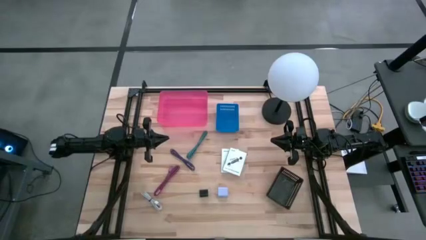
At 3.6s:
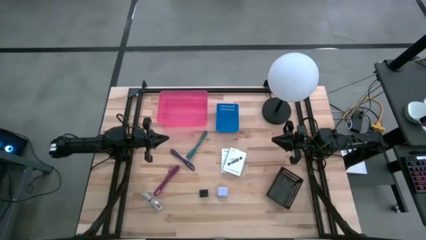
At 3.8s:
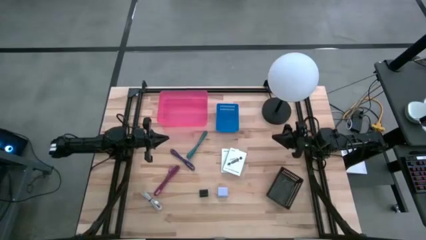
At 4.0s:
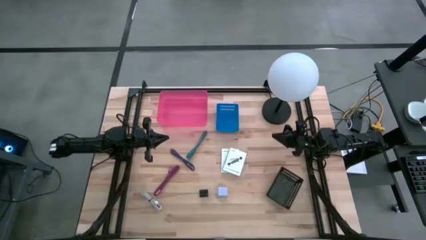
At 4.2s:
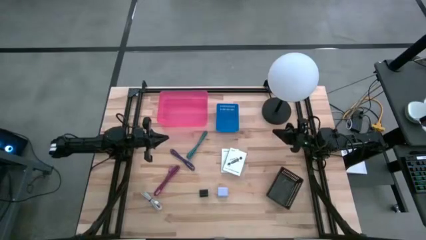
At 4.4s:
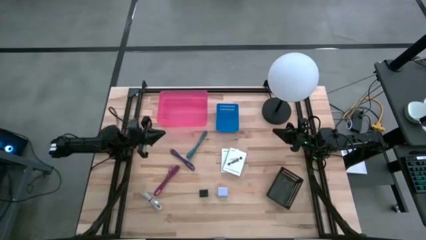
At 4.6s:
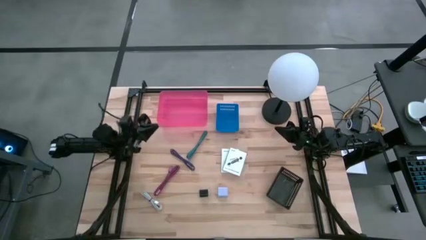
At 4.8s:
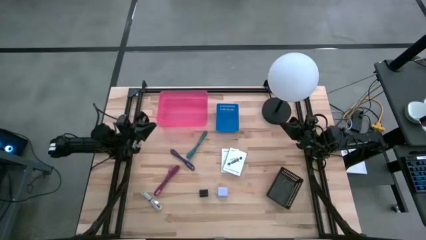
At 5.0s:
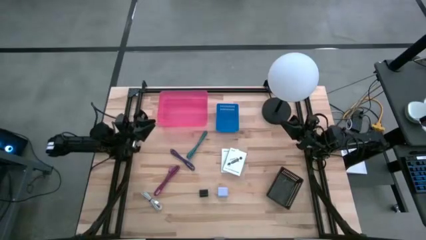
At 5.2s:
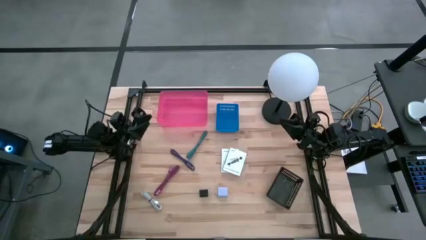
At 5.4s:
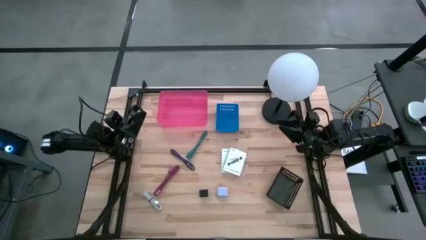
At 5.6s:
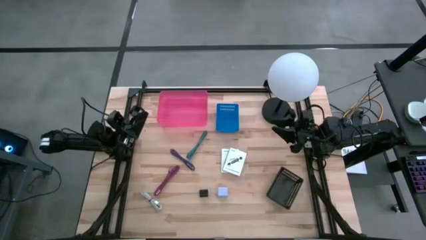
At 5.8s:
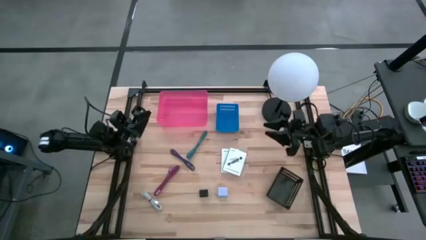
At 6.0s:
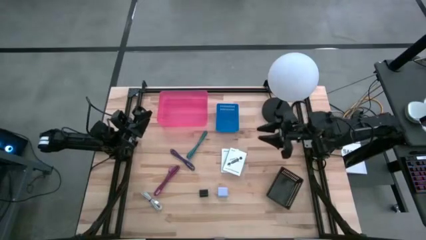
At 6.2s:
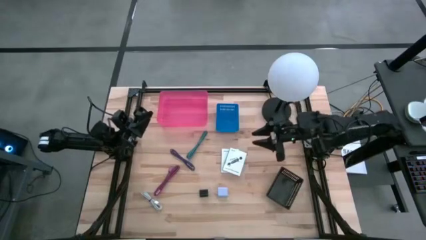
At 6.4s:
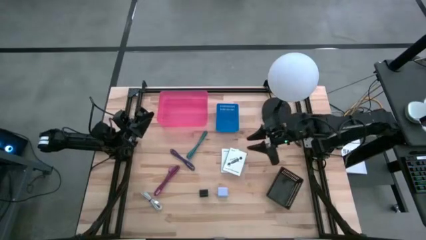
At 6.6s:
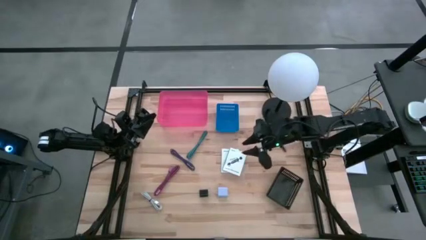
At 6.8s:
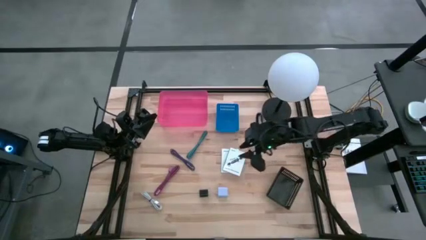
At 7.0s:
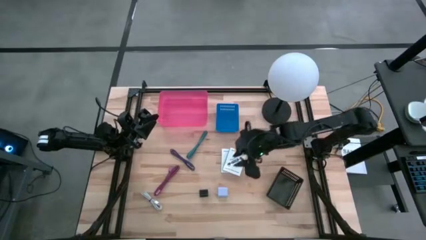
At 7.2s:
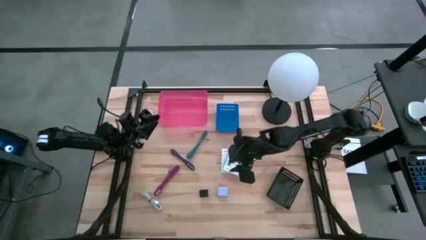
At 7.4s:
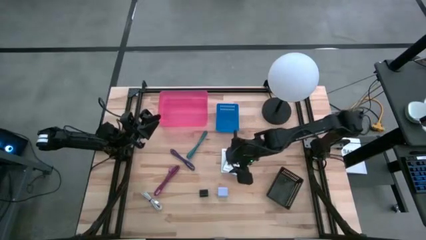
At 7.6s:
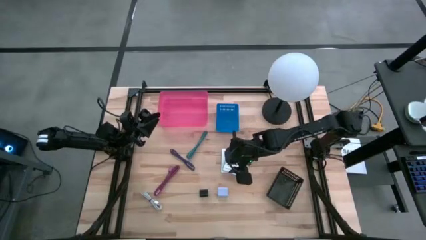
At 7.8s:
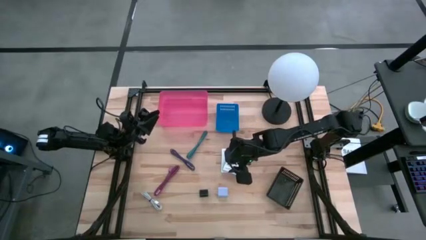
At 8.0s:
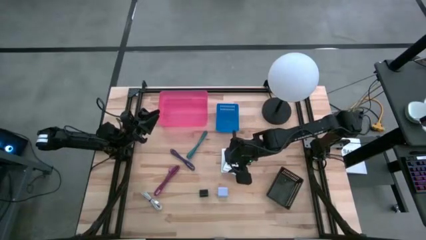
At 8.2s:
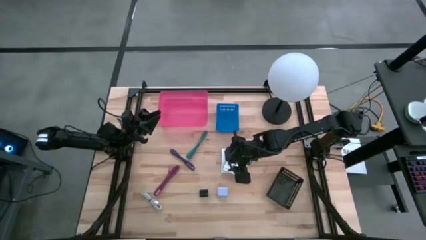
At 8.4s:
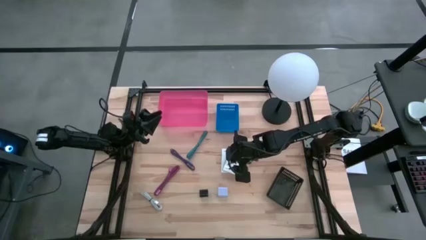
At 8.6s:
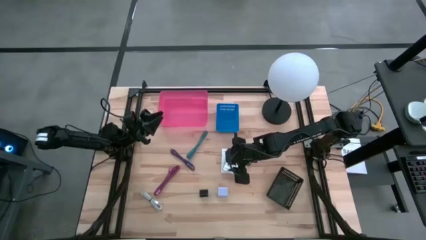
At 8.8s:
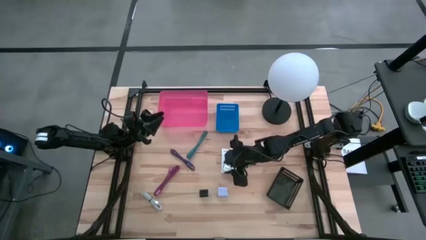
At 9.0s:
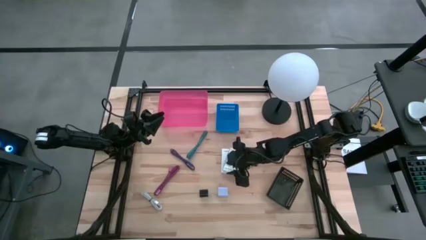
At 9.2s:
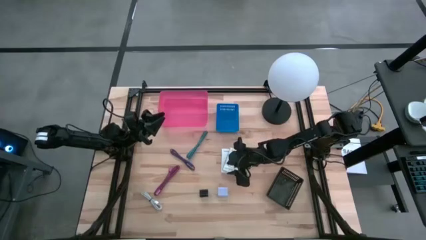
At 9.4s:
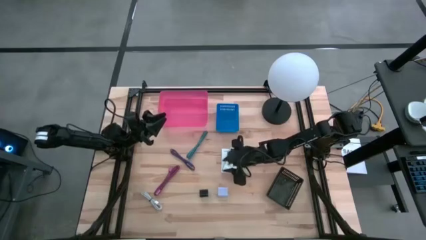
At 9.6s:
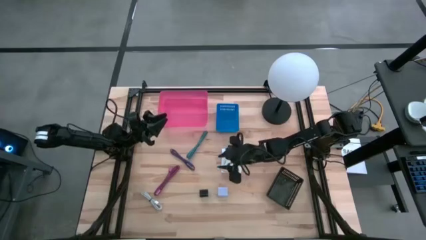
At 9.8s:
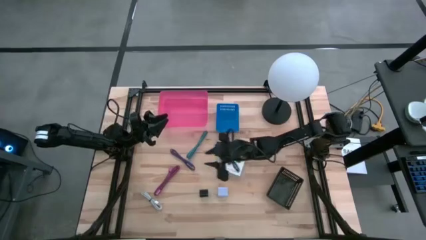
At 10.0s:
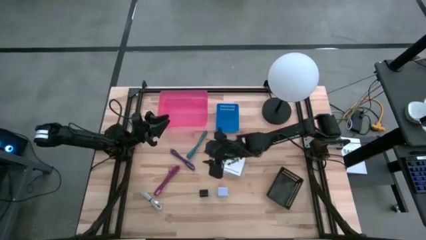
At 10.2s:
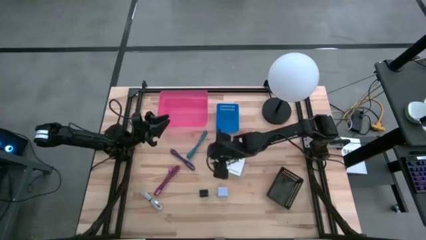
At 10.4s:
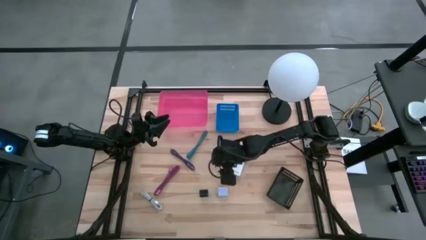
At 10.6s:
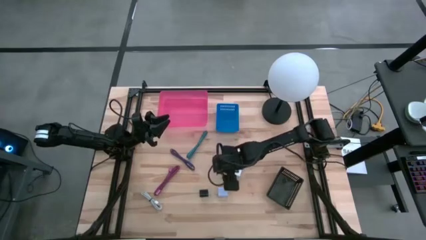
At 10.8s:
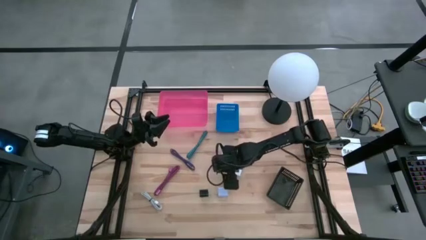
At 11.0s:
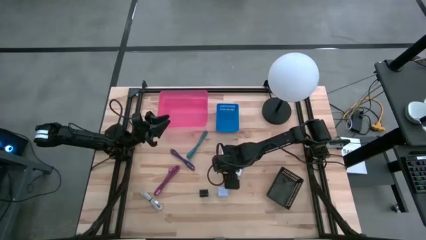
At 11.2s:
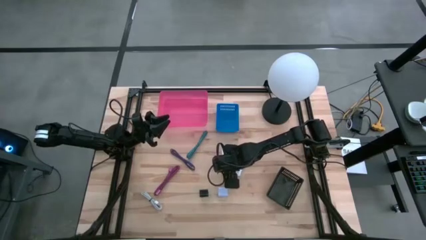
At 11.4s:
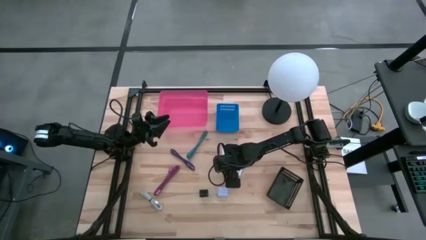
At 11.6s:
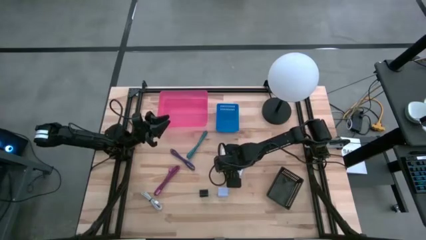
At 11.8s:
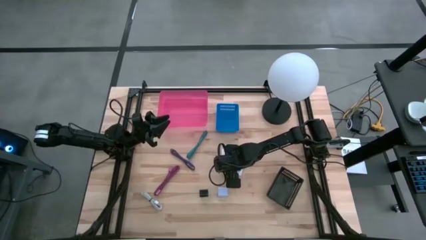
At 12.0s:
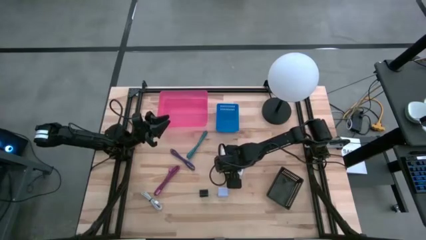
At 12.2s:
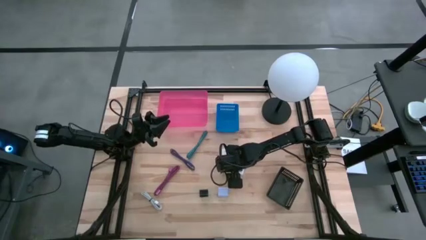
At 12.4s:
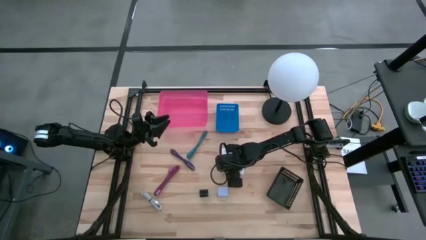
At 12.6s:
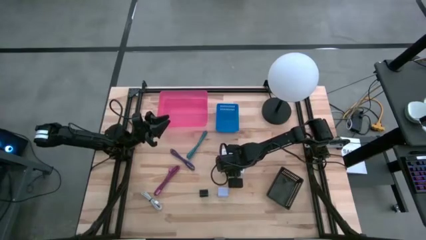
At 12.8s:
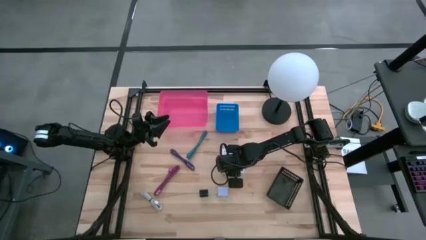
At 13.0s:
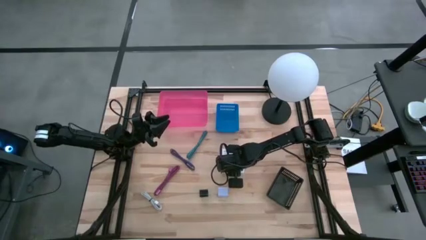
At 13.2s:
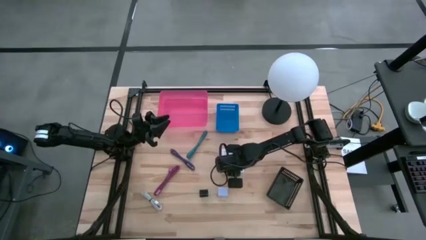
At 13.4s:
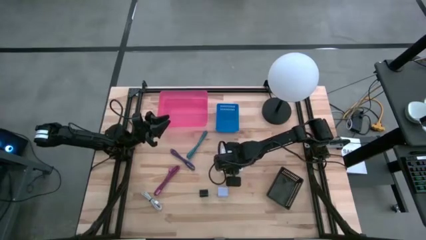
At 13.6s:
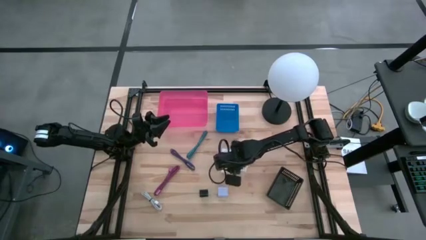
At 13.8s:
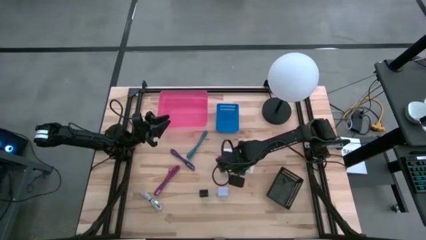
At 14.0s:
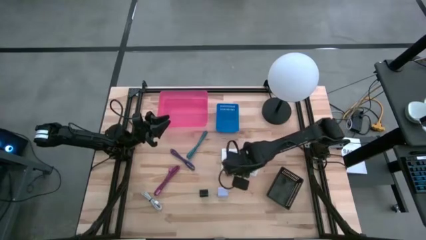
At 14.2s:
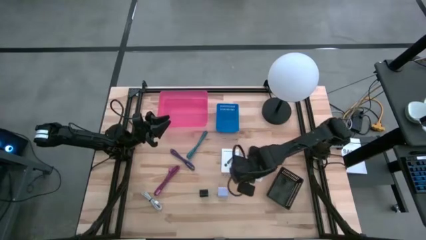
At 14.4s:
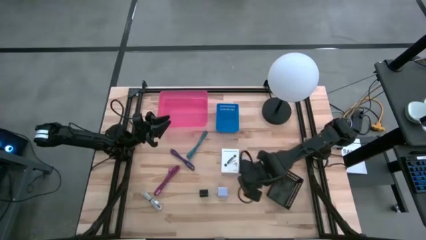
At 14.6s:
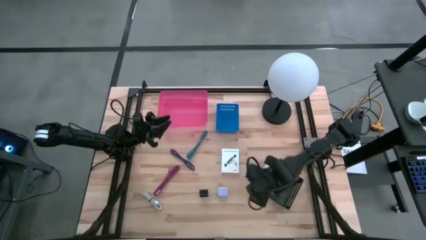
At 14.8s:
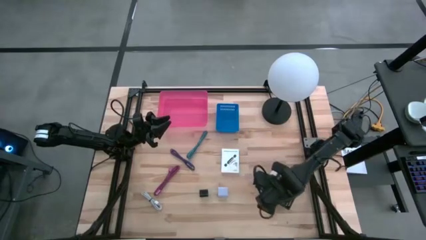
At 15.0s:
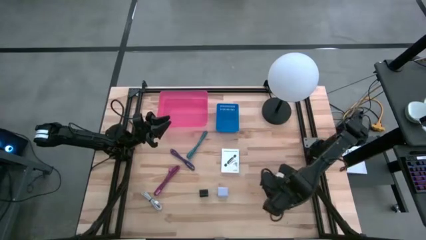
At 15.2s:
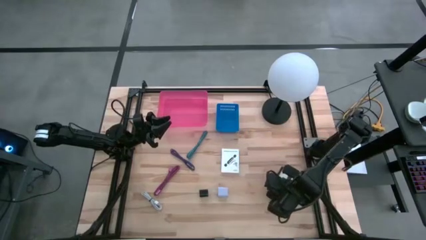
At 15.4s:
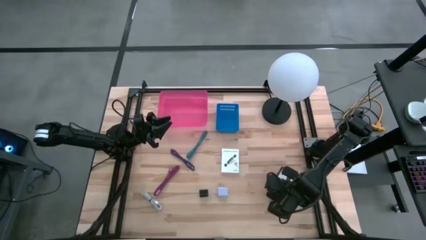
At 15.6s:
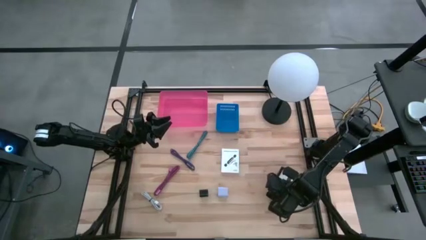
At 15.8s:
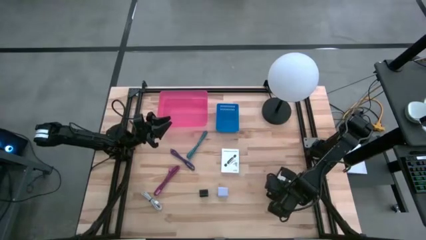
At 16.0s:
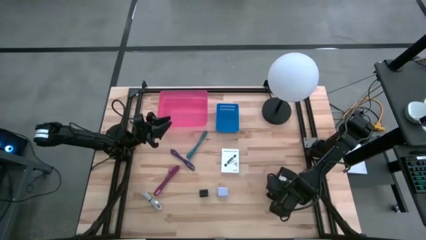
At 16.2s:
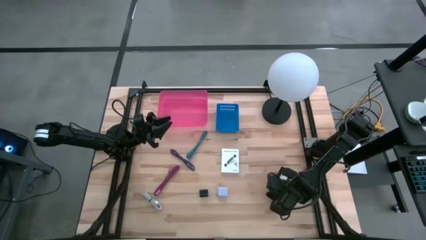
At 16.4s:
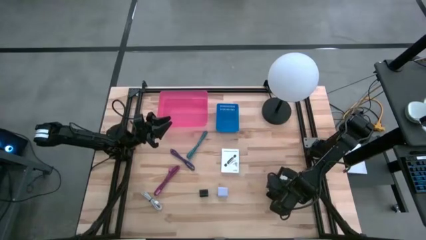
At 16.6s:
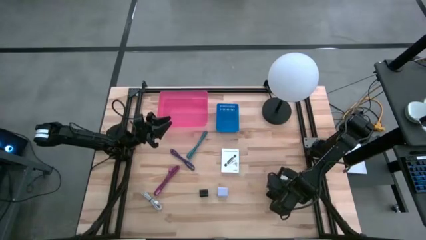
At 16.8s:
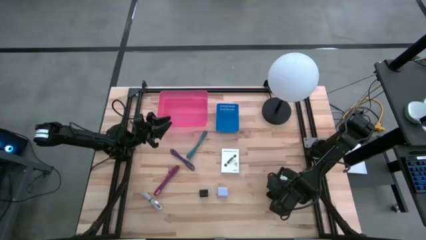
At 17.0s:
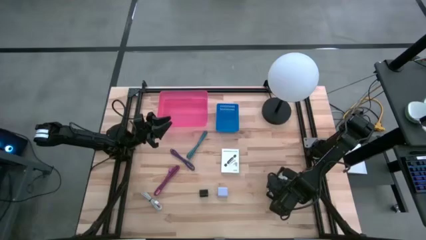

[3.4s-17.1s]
Task: Pick and place items into bin
Put the top white card reader box into the black bin
